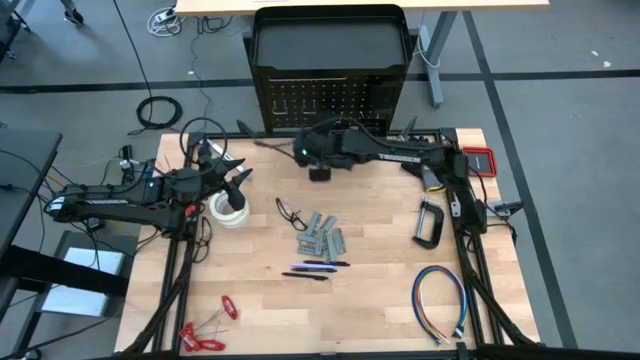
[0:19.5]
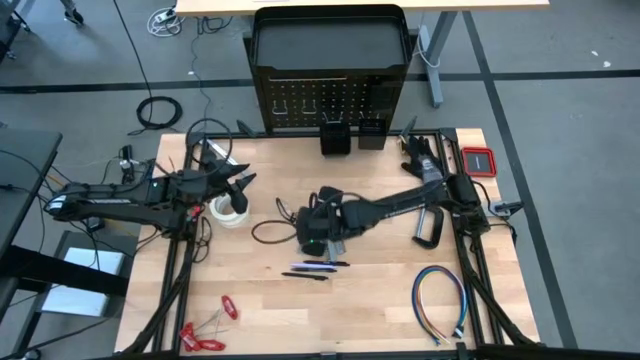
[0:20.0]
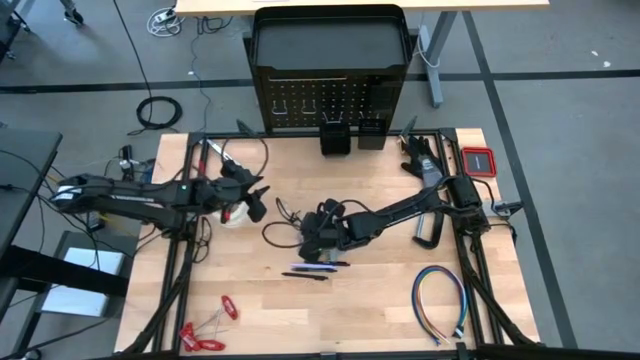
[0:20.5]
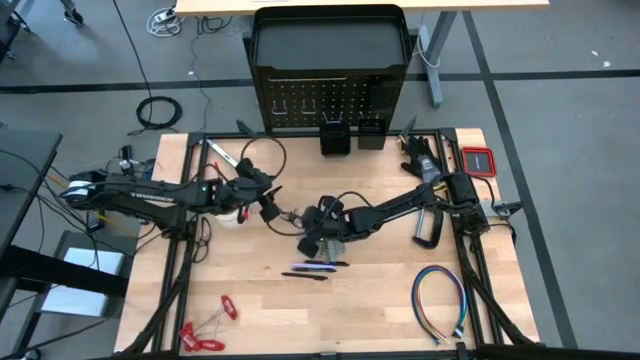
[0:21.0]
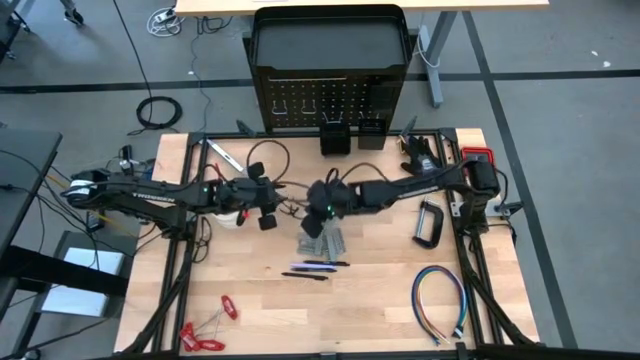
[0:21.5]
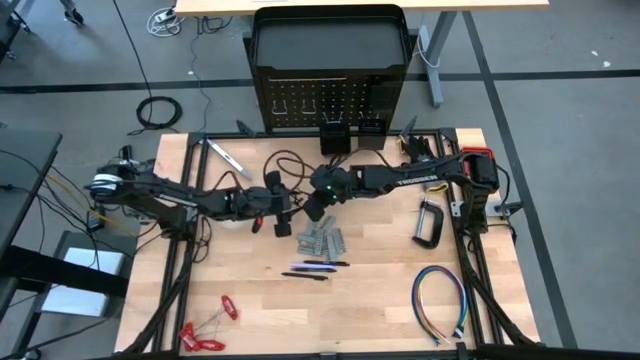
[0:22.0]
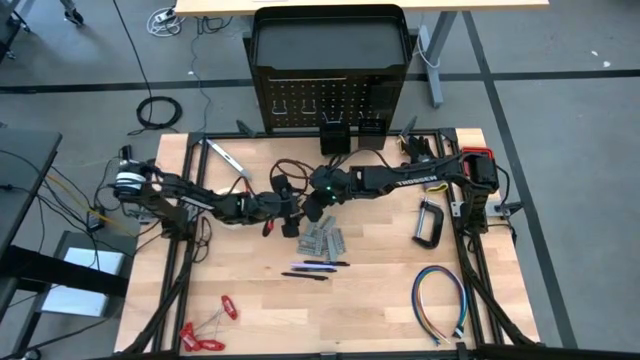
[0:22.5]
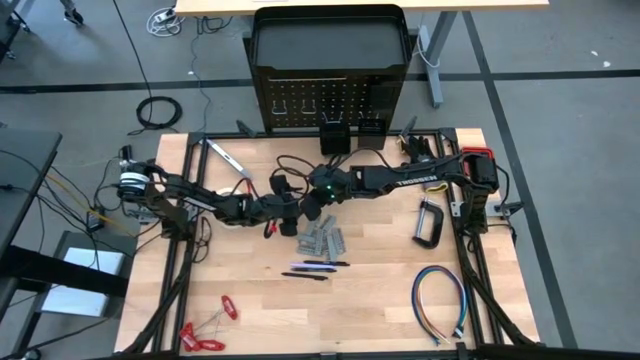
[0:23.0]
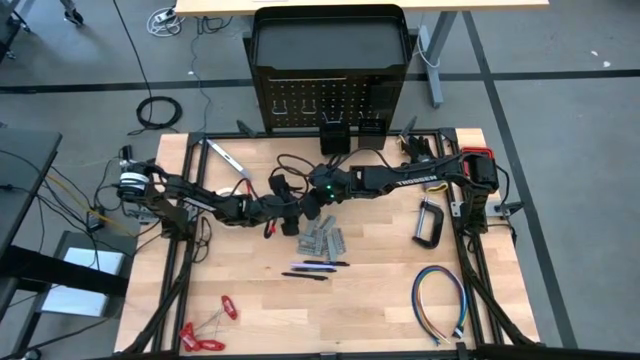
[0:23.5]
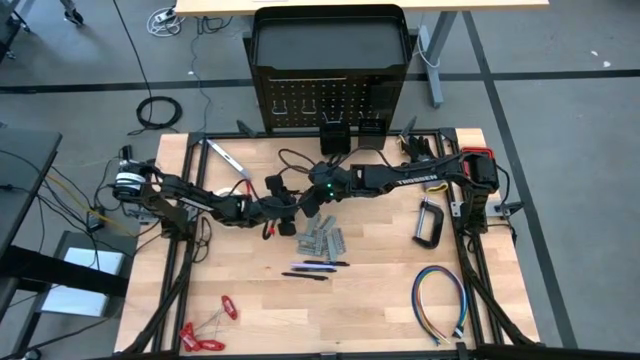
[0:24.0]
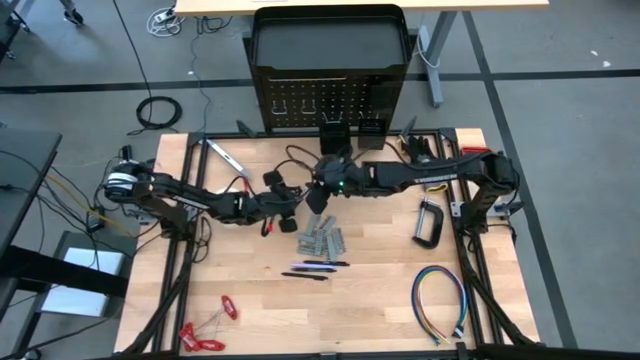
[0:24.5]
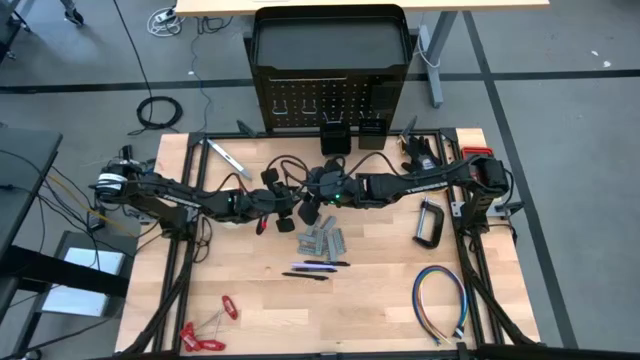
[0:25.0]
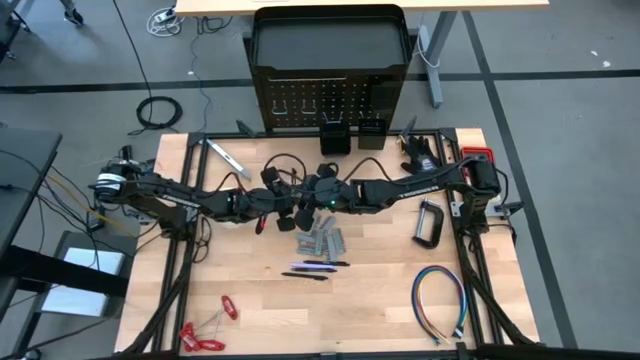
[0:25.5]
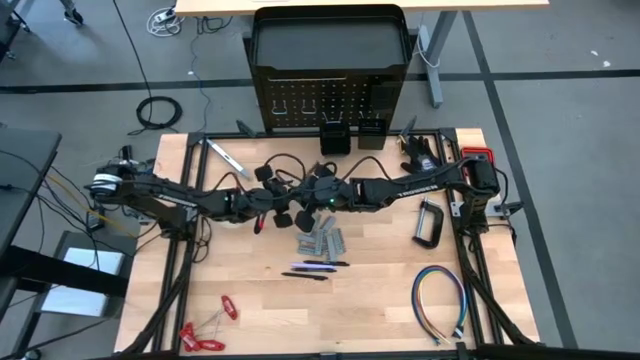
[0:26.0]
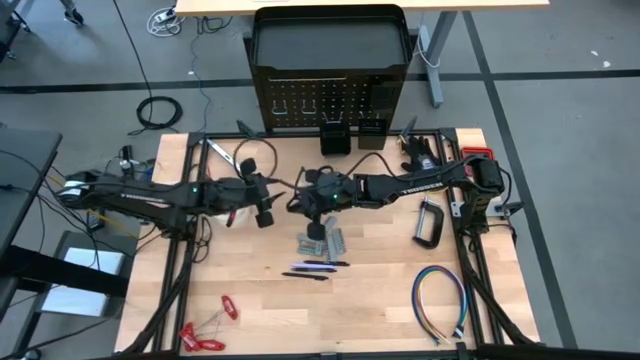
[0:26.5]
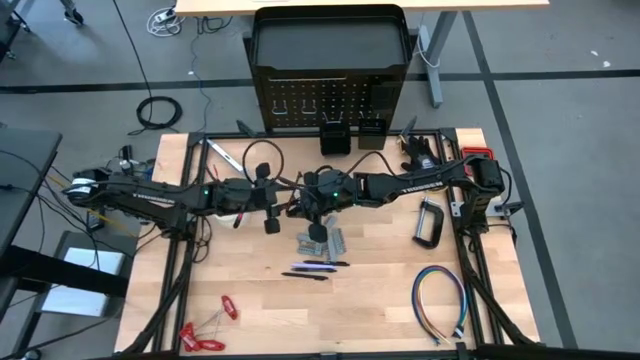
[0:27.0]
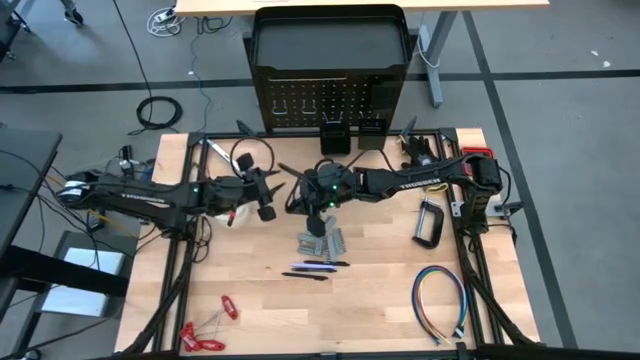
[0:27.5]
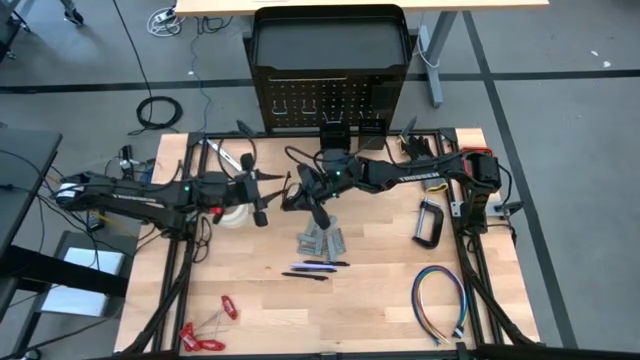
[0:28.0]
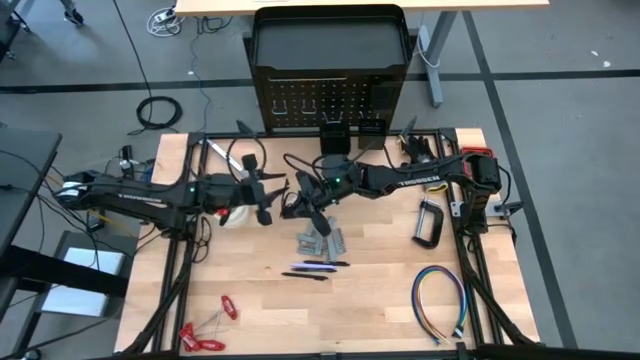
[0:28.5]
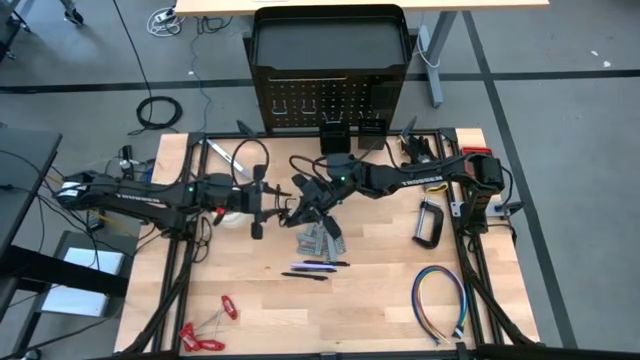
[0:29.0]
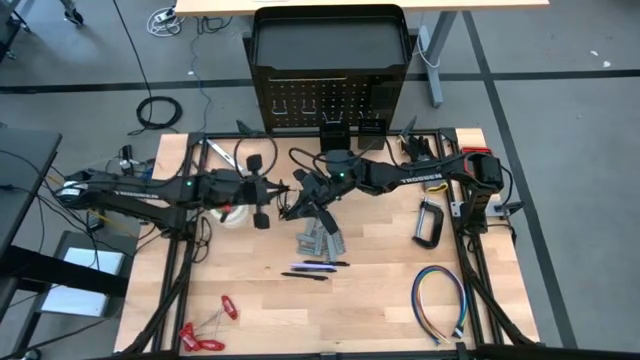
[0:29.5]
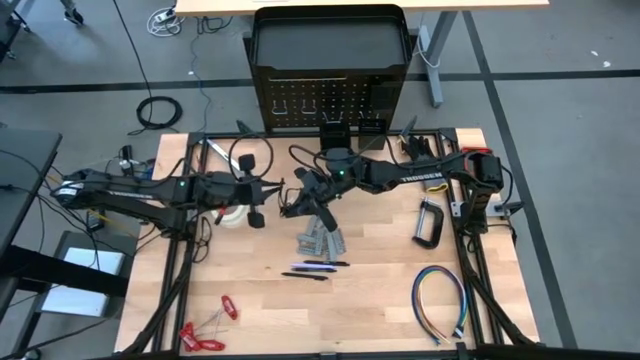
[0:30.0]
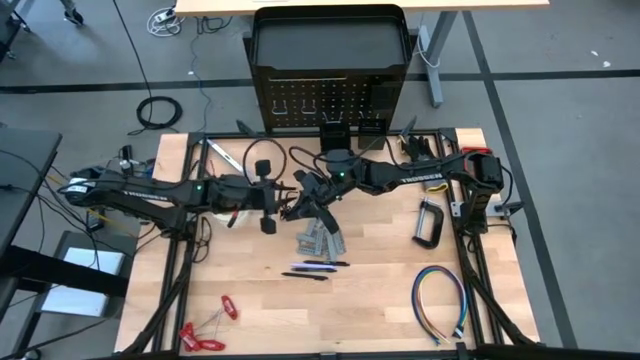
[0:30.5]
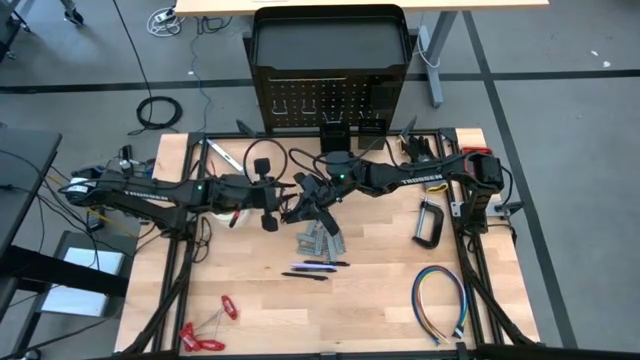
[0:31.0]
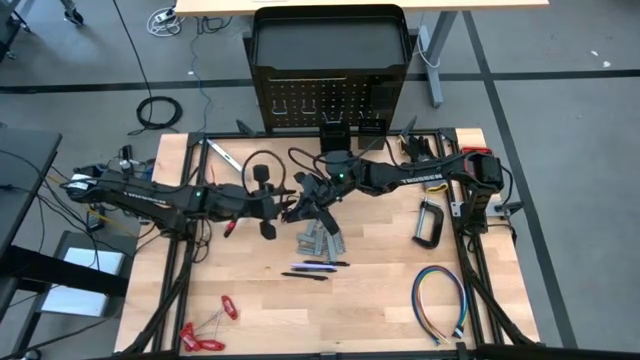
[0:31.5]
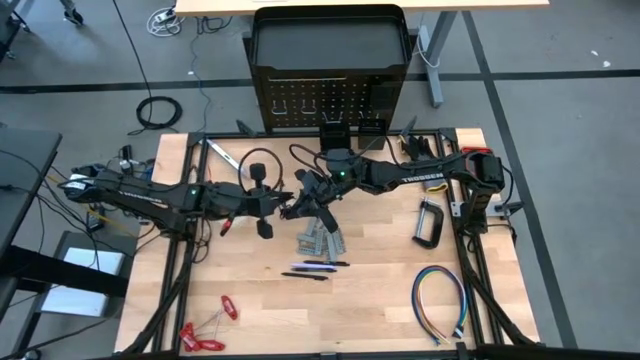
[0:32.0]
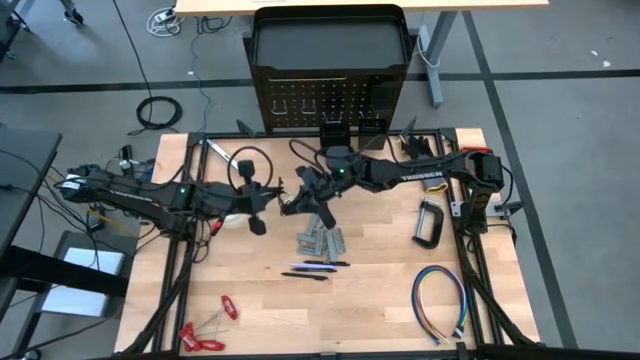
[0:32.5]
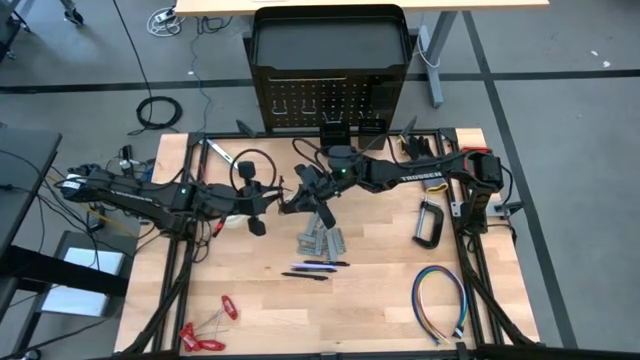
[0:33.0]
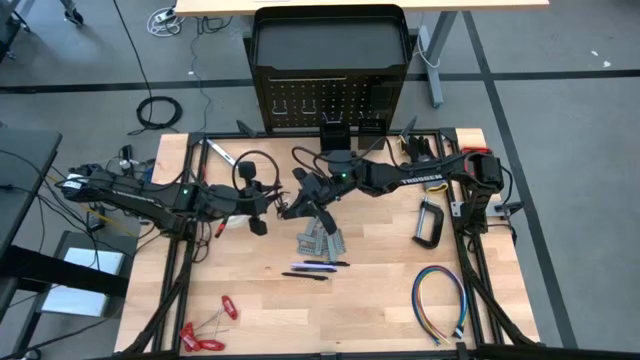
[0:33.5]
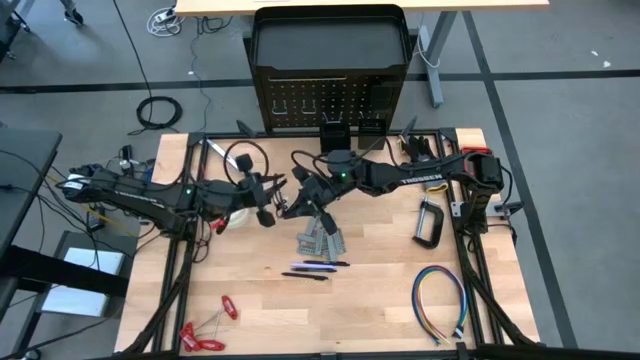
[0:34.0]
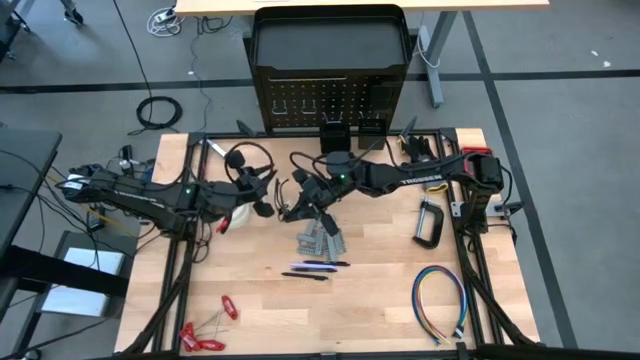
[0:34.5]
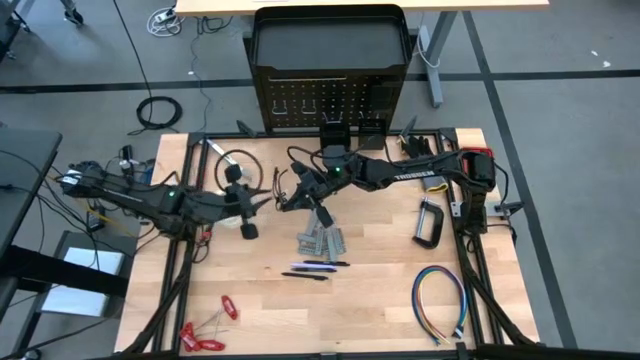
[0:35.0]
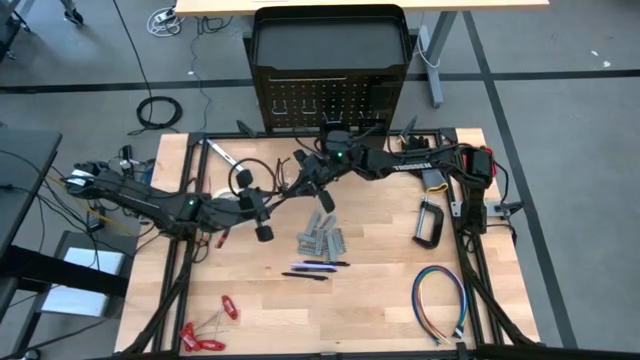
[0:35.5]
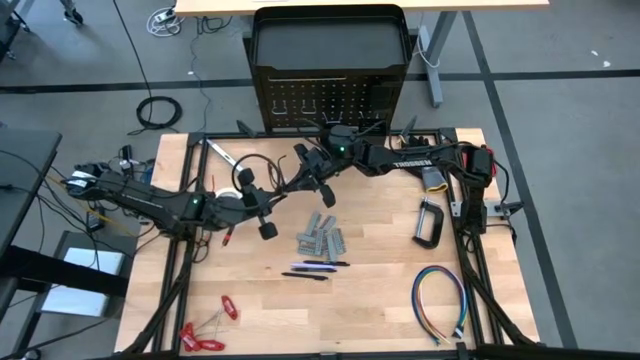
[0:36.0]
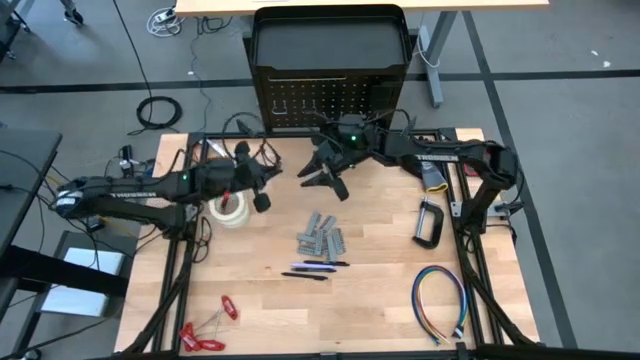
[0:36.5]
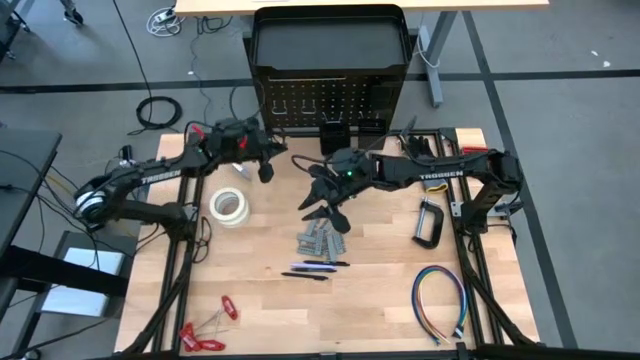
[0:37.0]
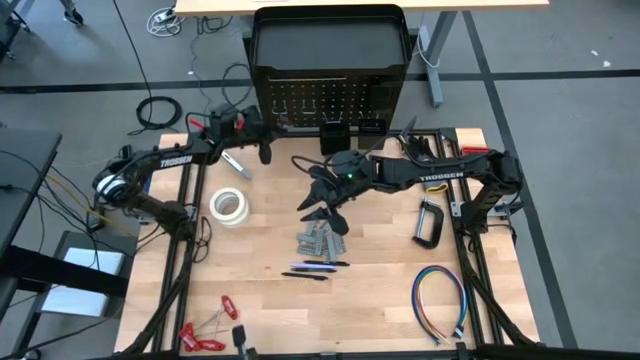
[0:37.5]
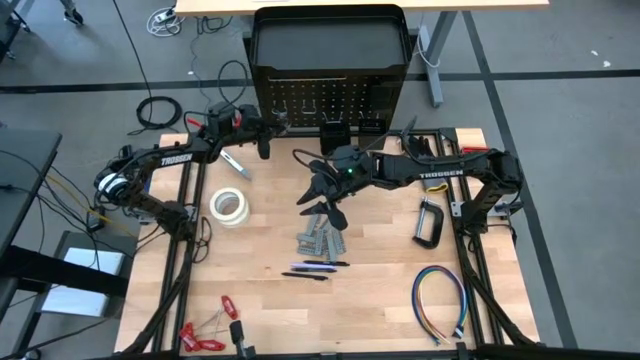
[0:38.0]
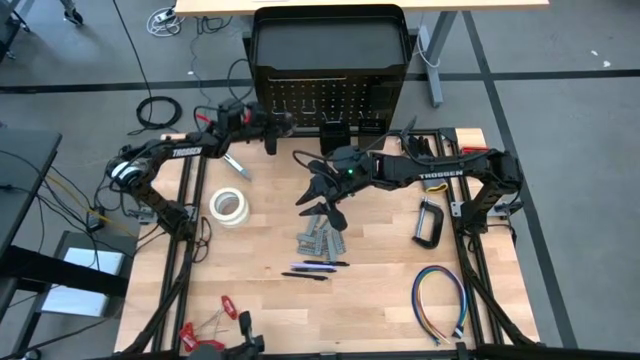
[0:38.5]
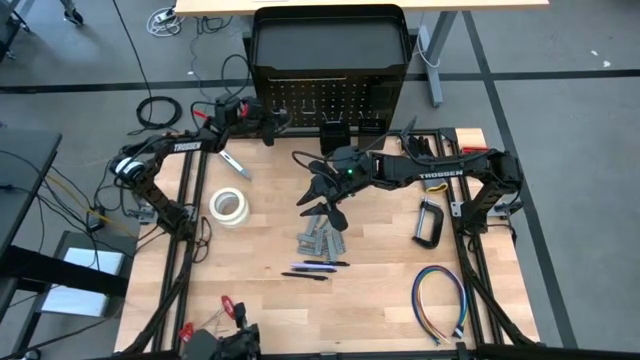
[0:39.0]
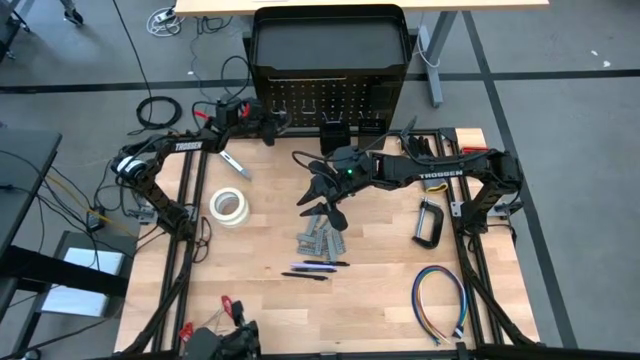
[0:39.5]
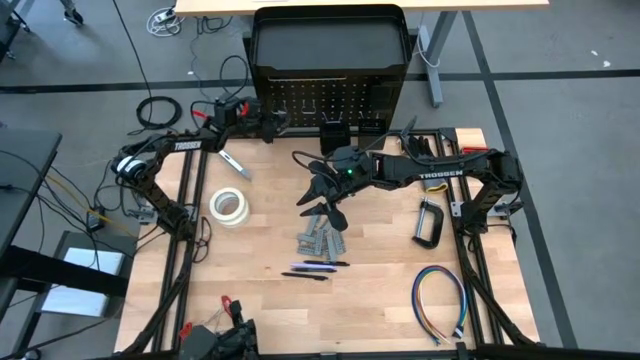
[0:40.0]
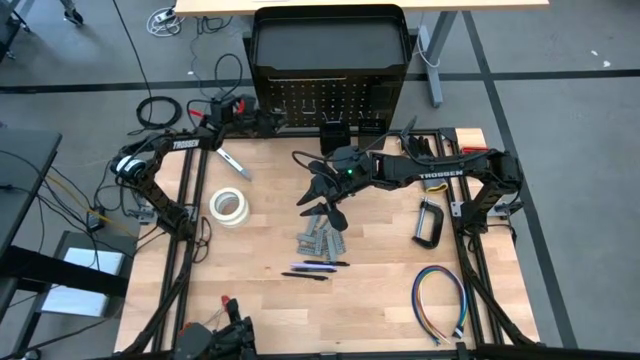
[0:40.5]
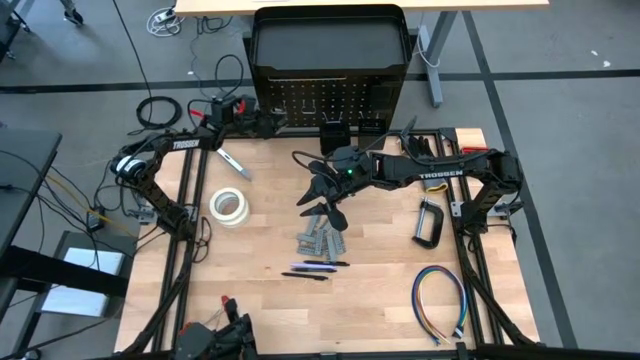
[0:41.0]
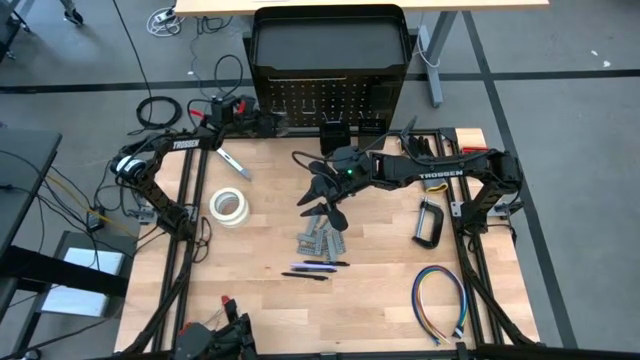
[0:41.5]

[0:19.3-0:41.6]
Task: Hang tools onto peg board
Hang the black safety glasses on the peg board
